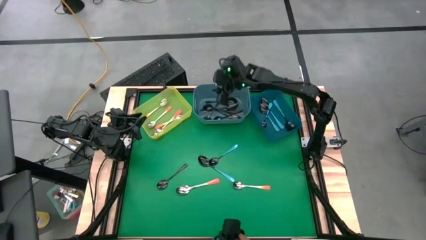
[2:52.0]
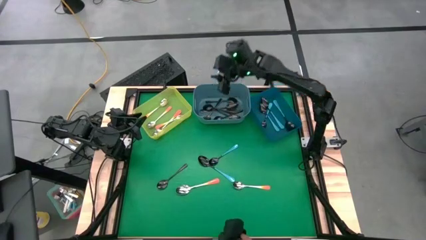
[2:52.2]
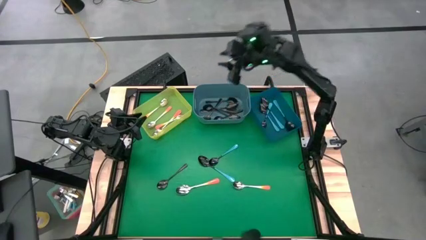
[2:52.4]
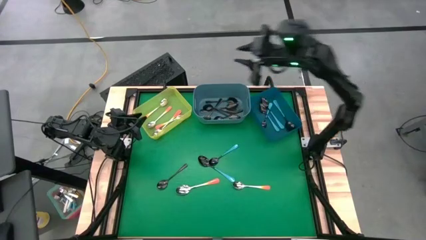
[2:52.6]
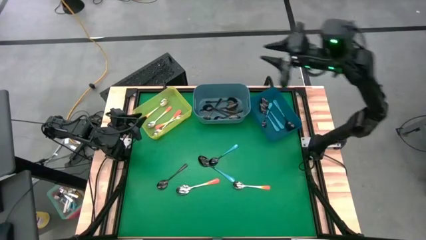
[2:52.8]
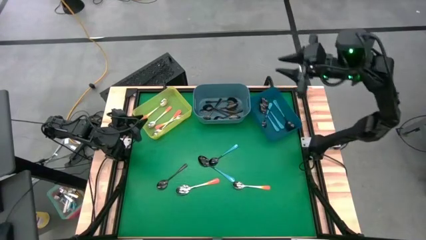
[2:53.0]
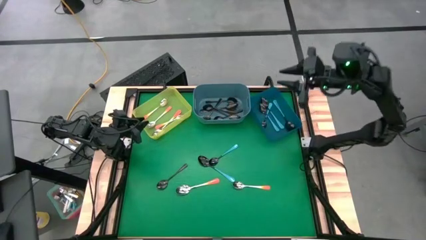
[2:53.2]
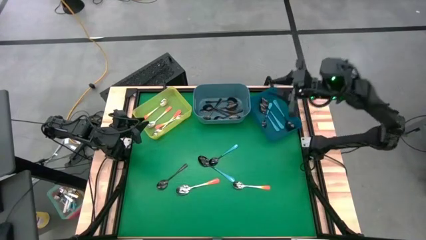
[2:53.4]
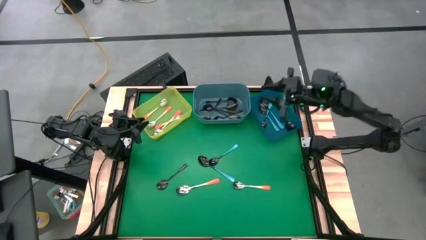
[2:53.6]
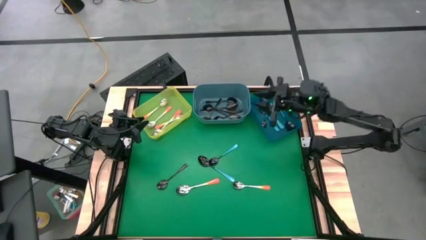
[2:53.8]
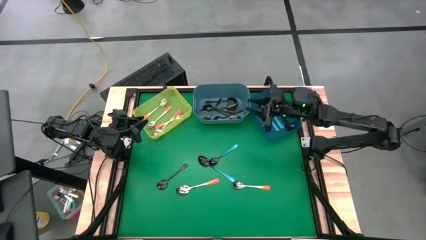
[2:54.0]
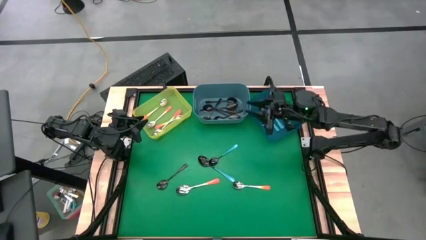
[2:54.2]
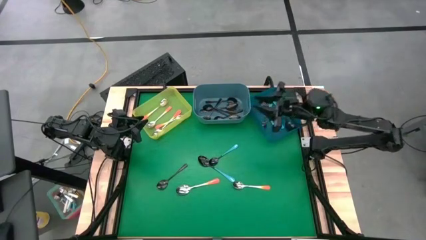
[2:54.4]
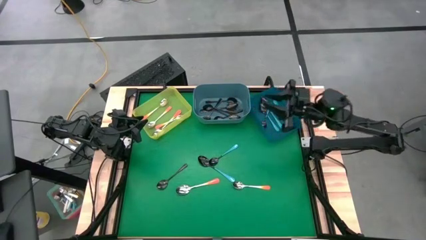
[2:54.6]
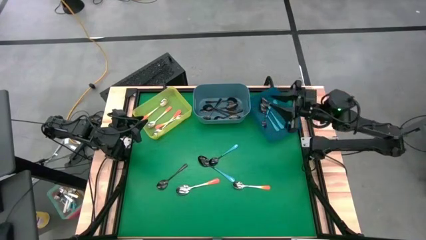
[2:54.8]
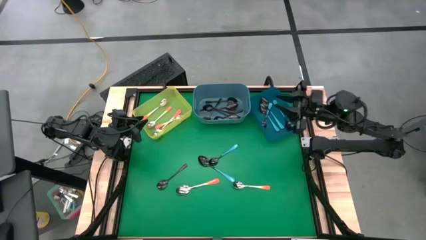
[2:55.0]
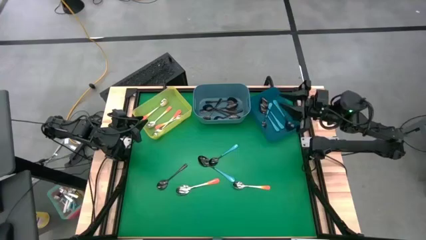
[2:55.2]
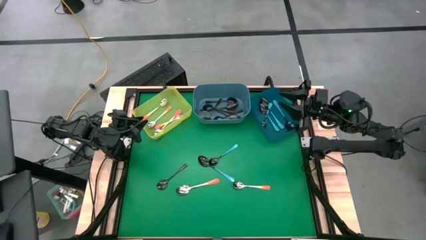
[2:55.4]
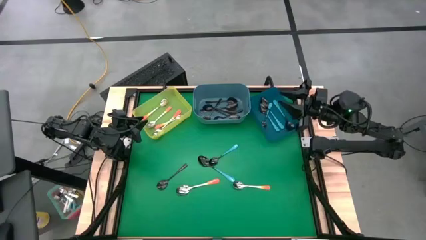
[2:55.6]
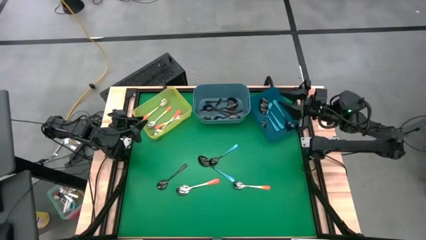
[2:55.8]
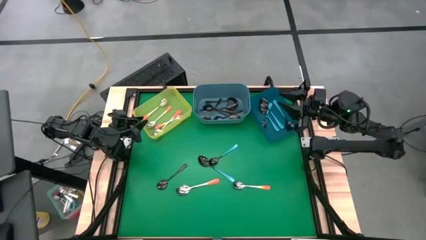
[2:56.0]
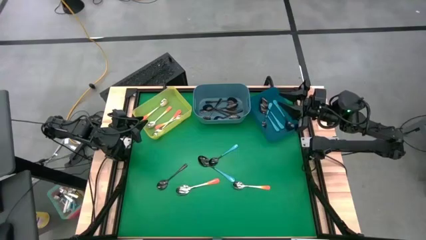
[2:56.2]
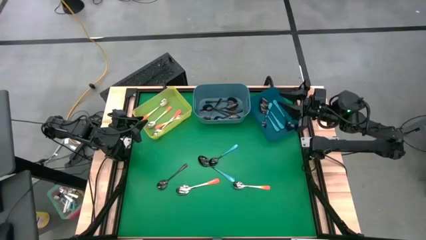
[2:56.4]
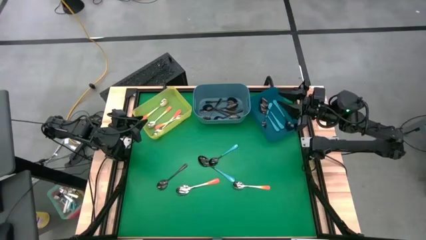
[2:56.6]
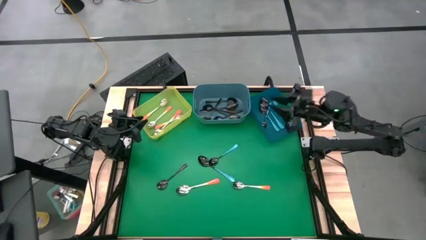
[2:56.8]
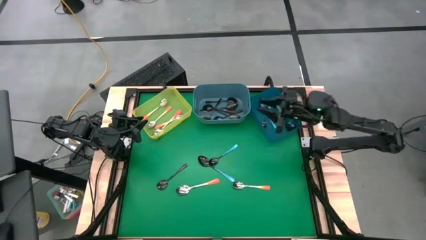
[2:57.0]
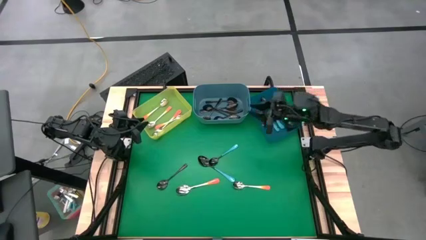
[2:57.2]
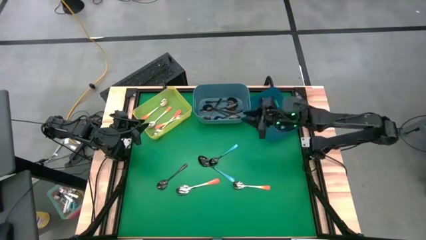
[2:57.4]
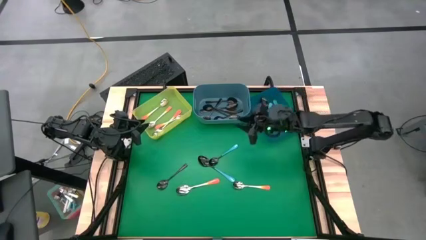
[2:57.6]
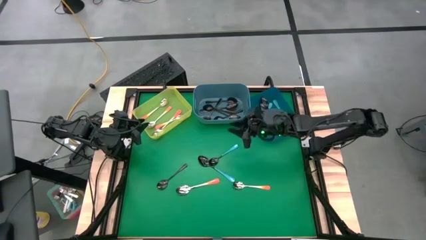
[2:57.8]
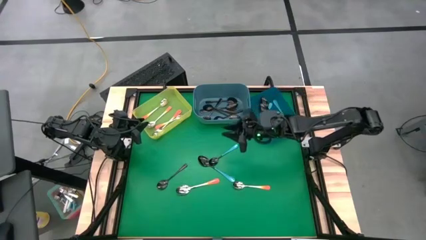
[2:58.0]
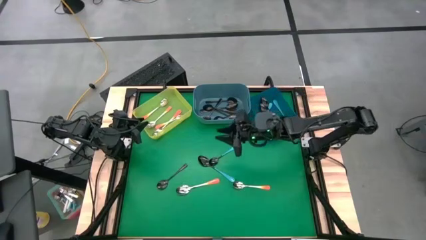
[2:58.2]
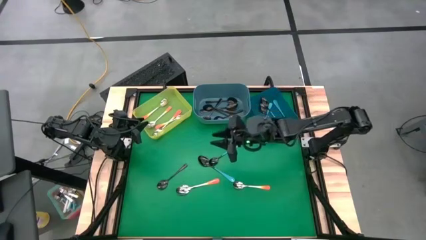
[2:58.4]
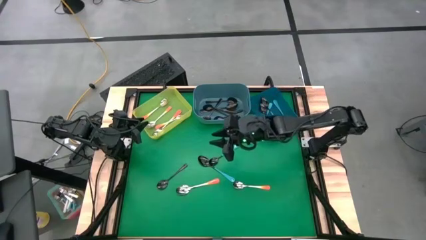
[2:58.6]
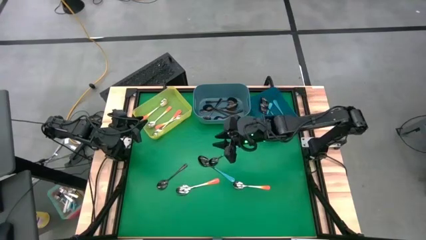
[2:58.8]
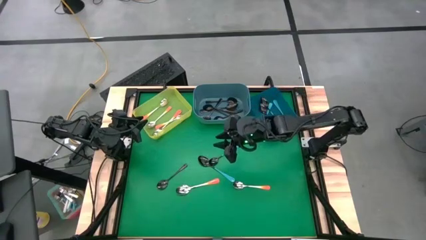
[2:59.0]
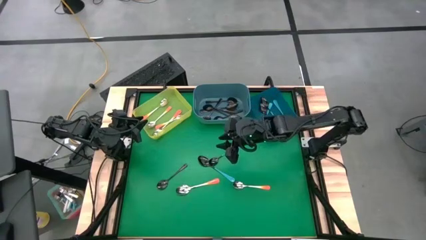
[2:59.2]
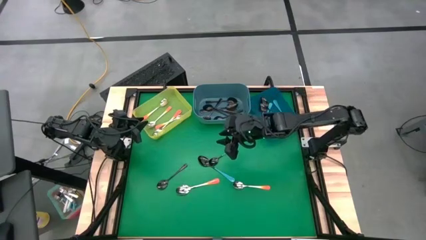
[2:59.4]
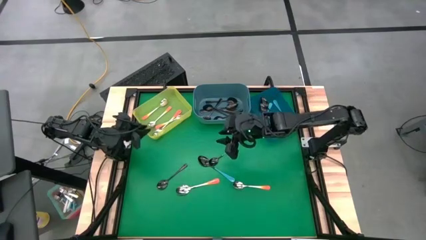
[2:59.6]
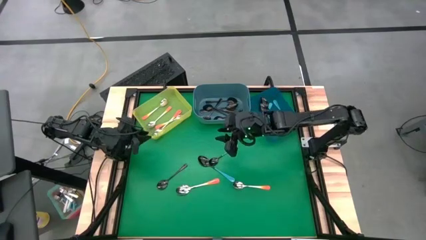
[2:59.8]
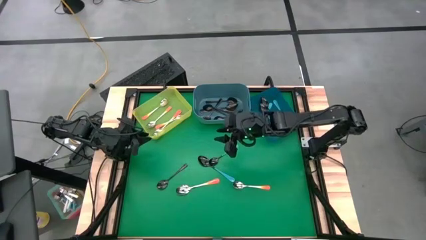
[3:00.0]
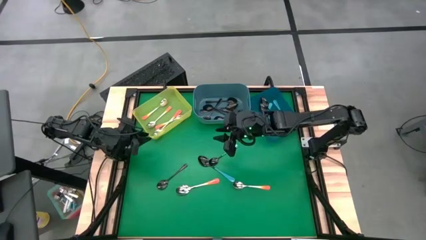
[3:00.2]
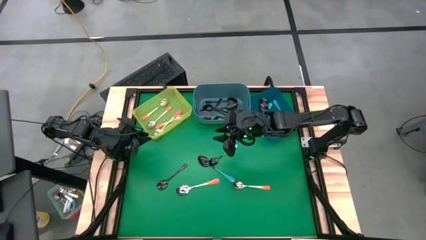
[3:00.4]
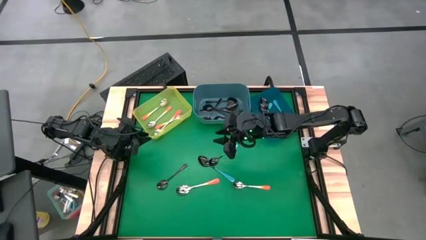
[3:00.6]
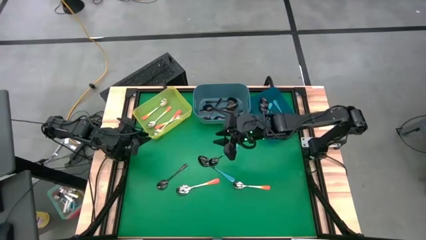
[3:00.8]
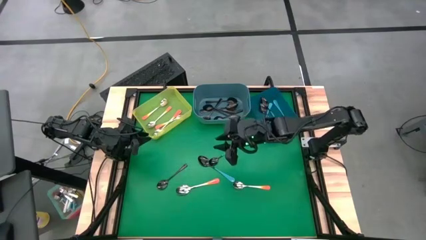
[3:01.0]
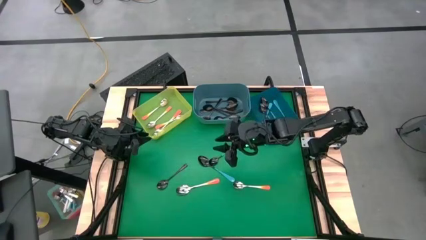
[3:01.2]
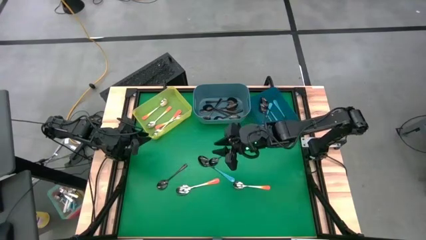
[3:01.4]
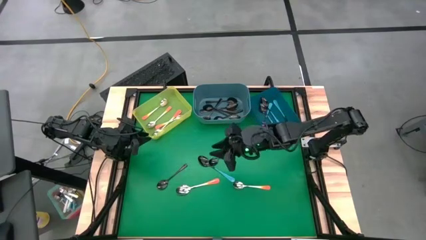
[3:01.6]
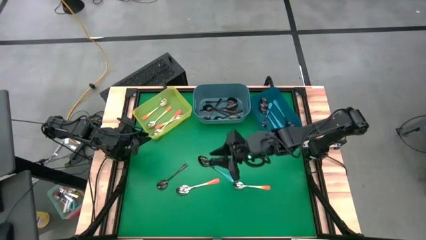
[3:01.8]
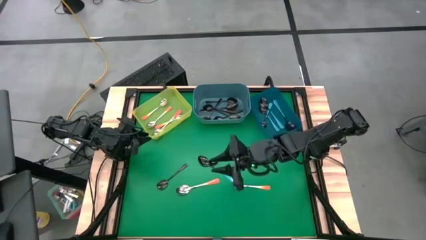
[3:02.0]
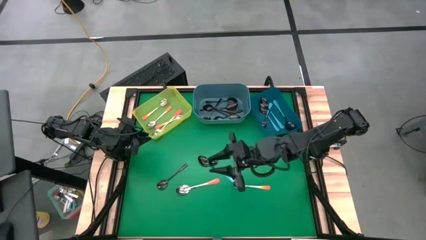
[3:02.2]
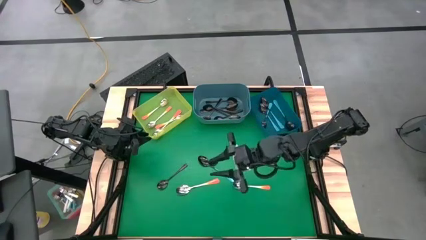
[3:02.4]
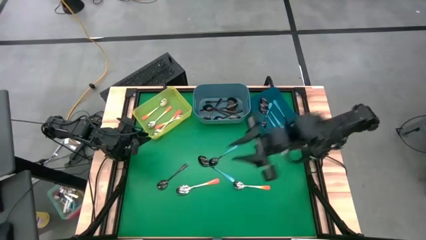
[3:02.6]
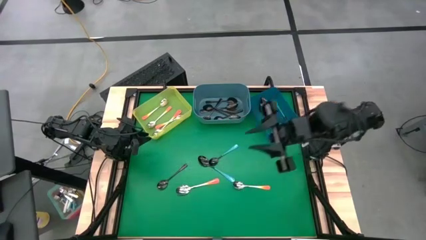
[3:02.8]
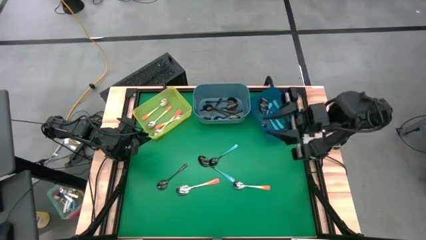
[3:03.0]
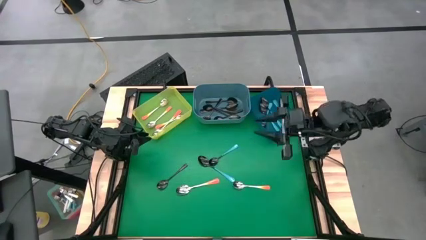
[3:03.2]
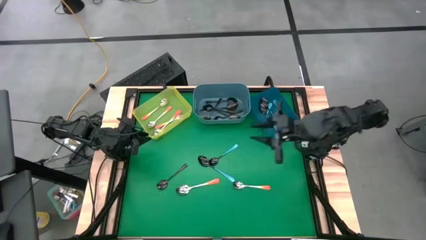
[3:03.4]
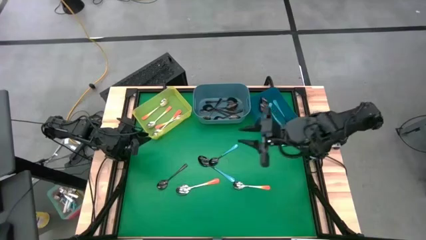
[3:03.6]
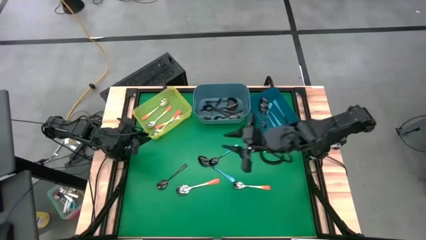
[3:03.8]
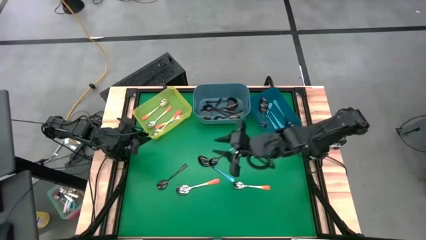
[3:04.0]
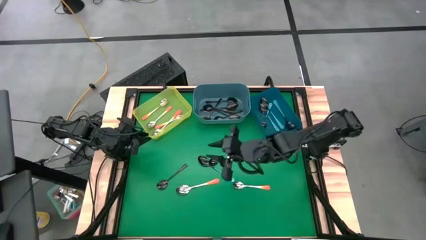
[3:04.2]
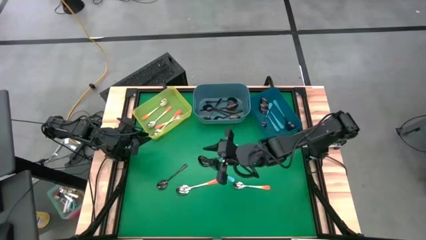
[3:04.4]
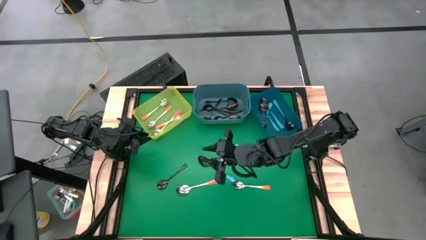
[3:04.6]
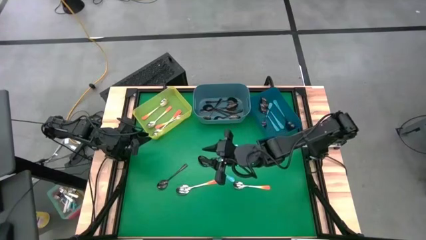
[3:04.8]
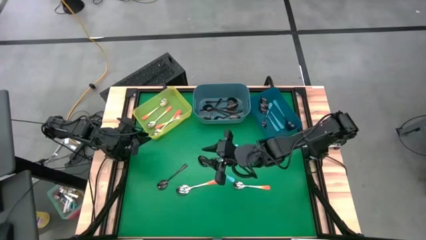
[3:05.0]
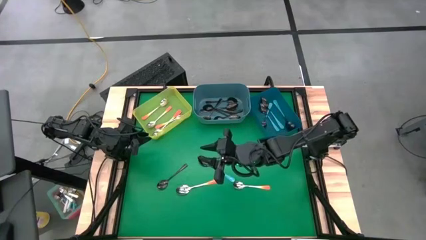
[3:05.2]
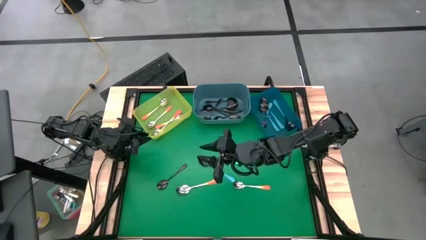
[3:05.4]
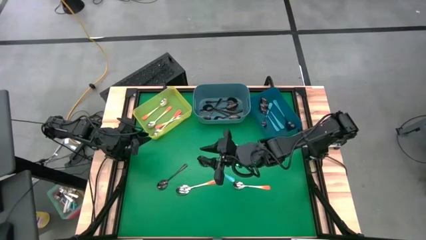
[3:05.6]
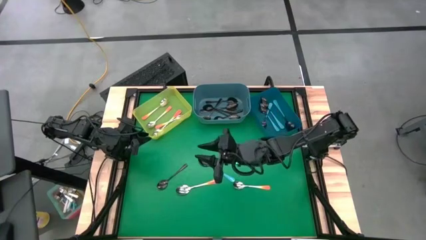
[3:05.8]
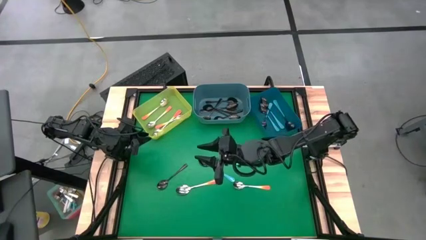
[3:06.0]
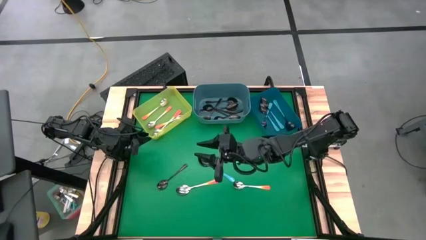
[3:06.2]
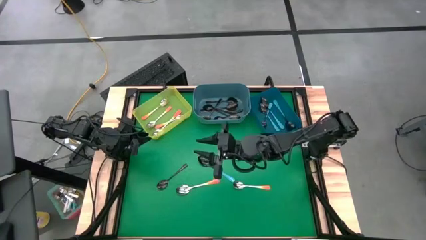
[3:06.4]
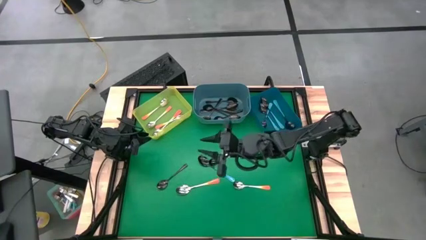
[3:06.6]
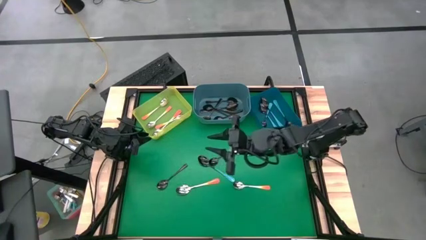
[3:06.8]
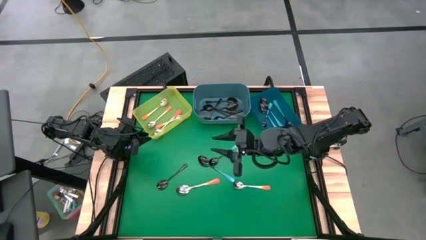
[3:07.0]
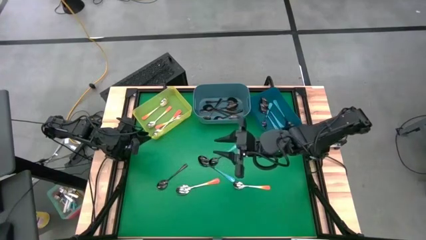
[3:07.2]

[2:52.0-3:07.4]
Task: Sort silverware by color (type)
Put the blue spoon into the blue bin

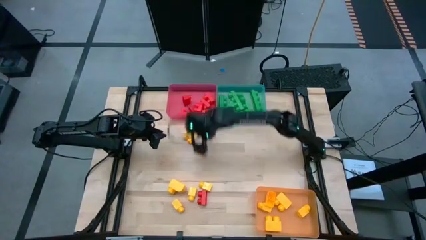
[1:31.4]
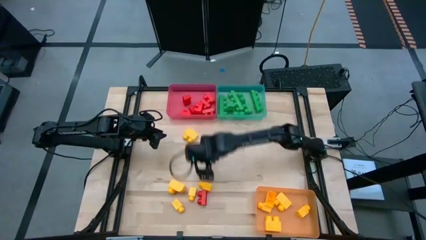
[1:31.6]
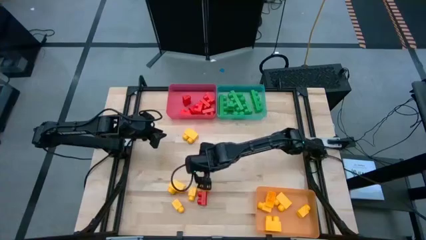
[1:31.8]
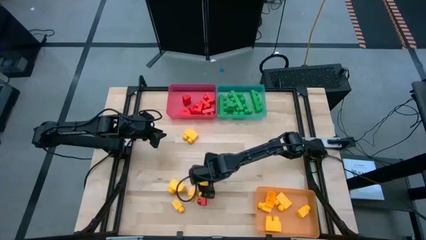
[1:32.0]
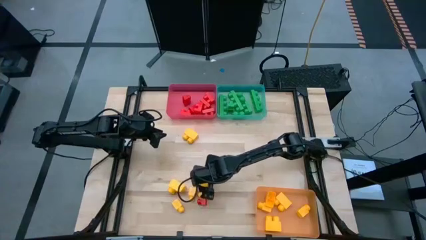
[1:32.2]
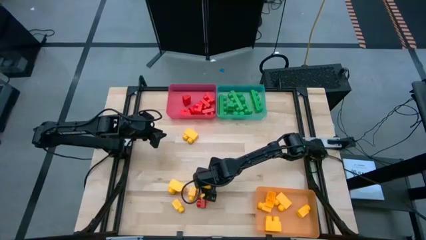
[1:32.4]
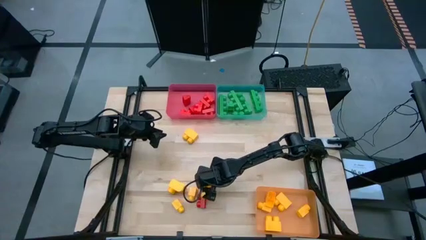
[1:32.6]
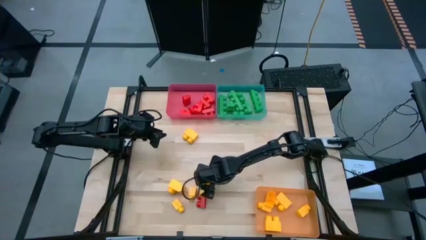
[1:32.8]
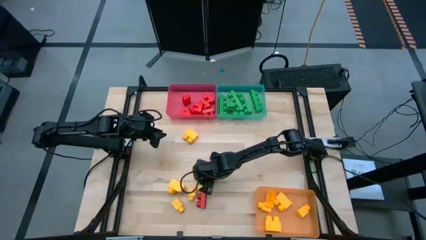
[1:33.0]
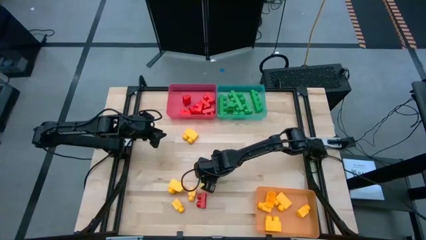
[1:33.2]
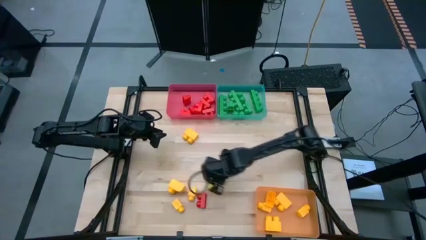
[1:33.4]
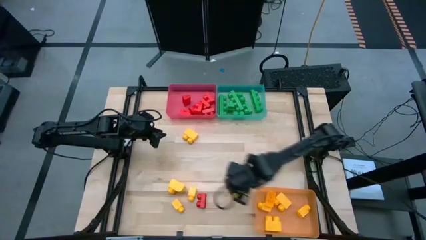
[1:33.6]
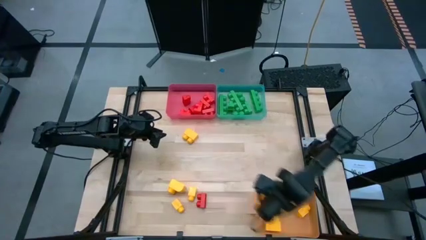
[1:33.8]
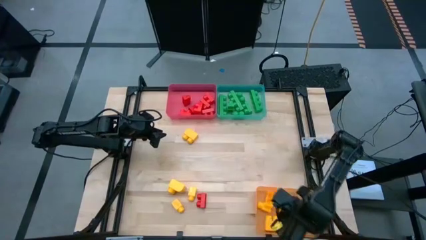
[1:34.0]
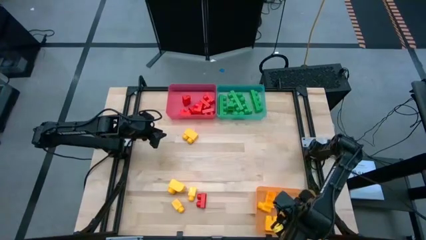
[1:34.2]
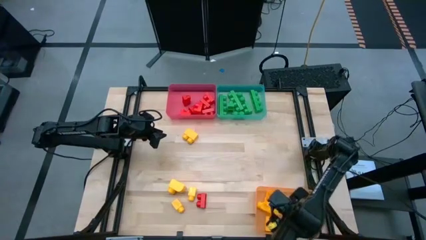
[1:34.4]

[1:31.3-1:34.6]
Task: Sort blocks
Put the yellow game piece into the yellow bin
